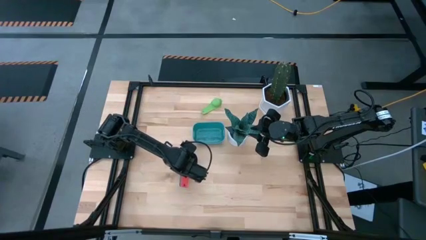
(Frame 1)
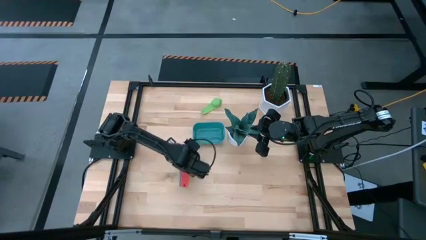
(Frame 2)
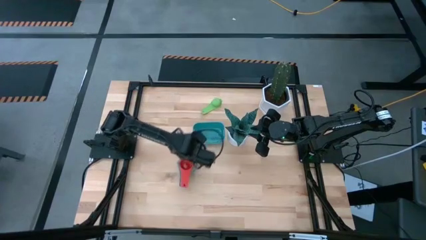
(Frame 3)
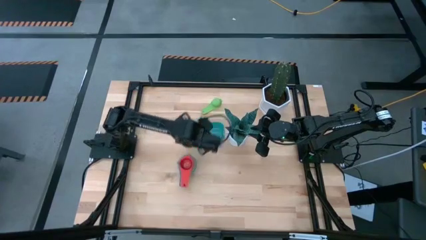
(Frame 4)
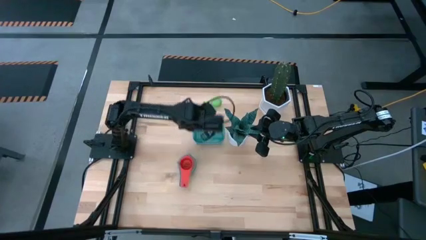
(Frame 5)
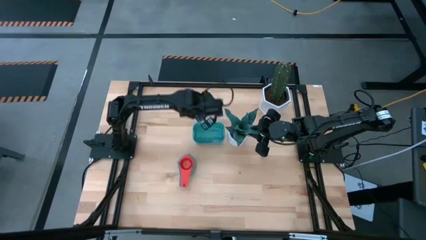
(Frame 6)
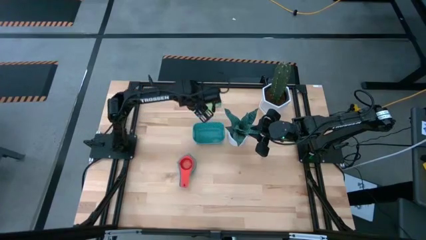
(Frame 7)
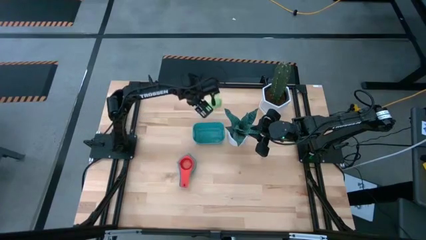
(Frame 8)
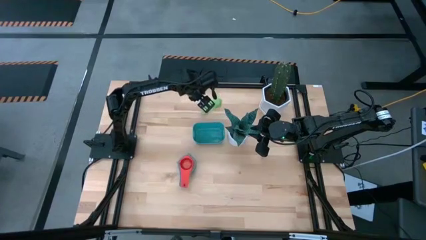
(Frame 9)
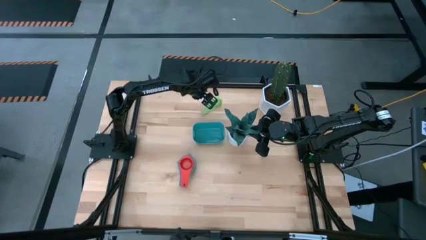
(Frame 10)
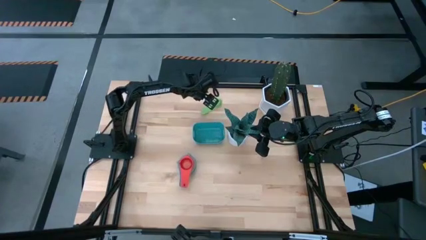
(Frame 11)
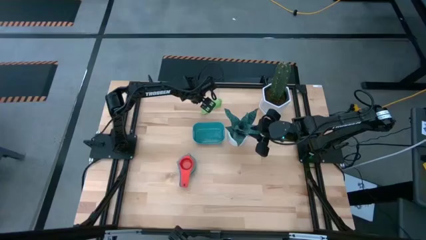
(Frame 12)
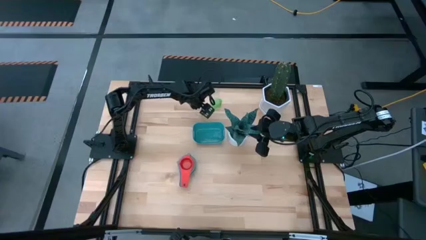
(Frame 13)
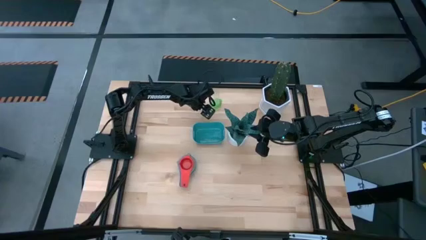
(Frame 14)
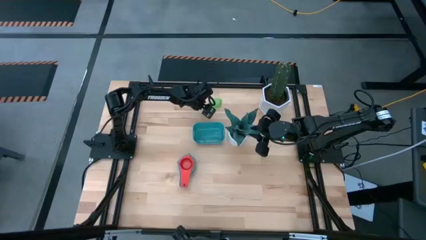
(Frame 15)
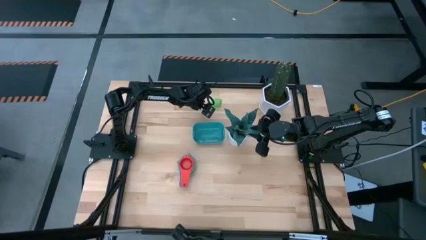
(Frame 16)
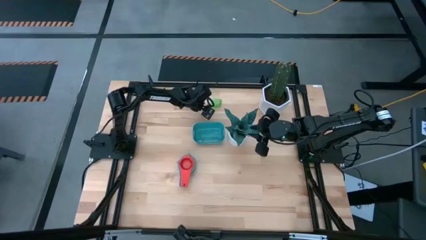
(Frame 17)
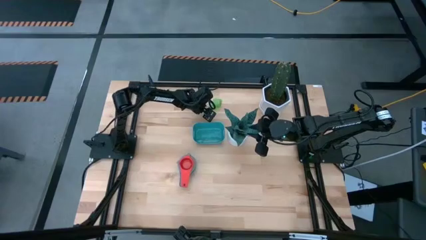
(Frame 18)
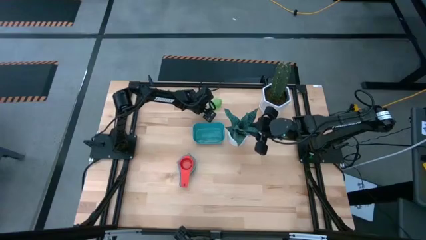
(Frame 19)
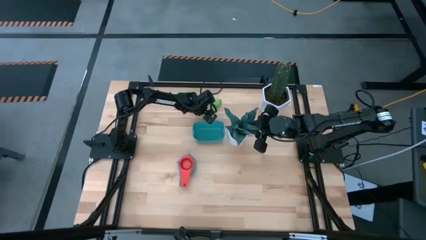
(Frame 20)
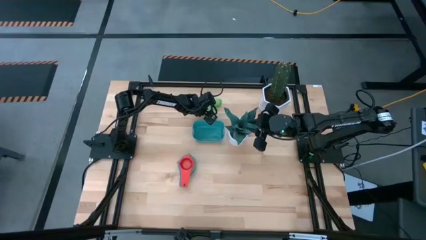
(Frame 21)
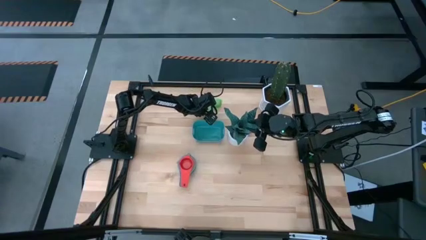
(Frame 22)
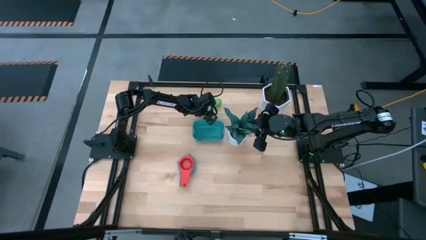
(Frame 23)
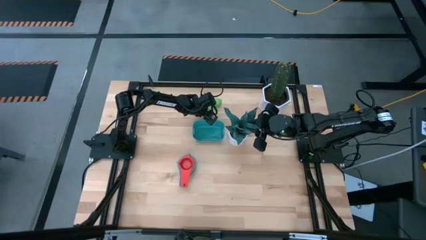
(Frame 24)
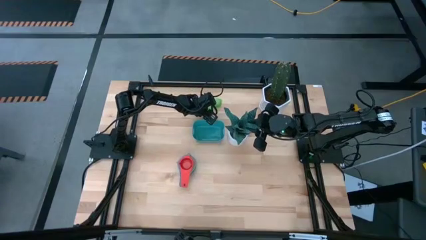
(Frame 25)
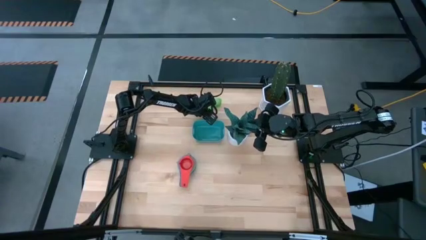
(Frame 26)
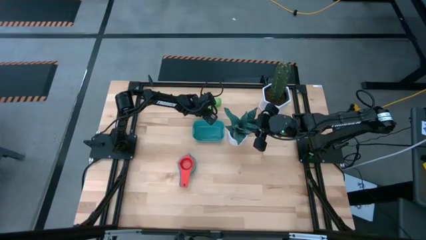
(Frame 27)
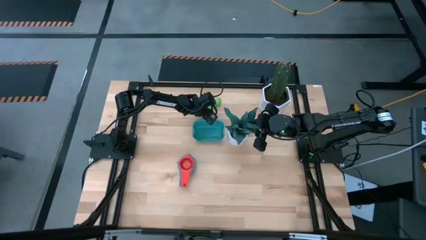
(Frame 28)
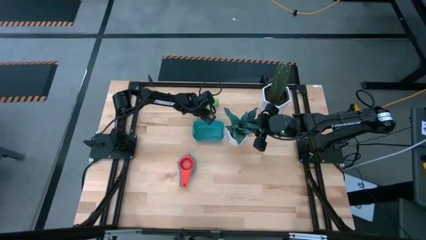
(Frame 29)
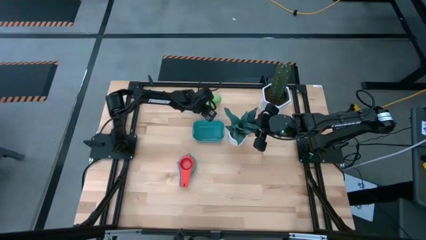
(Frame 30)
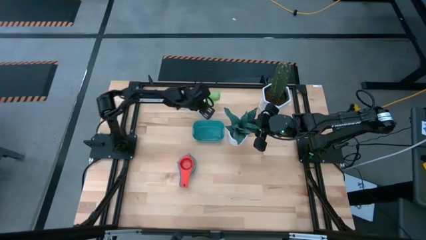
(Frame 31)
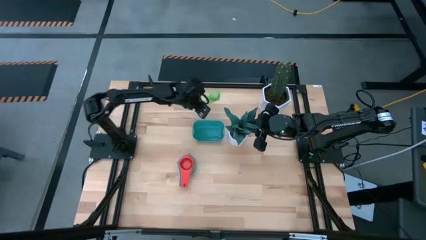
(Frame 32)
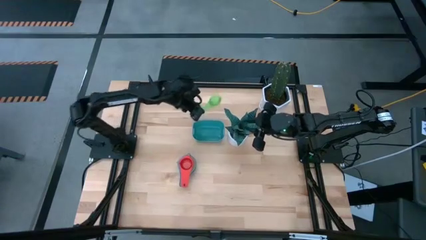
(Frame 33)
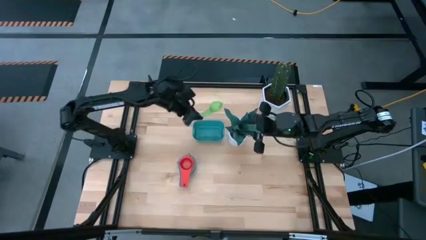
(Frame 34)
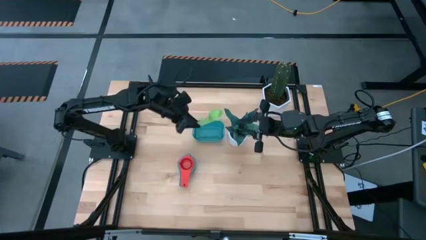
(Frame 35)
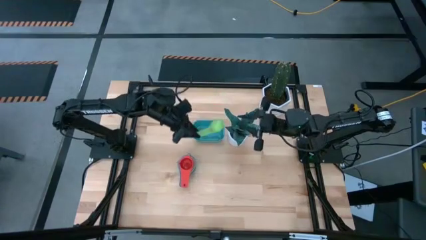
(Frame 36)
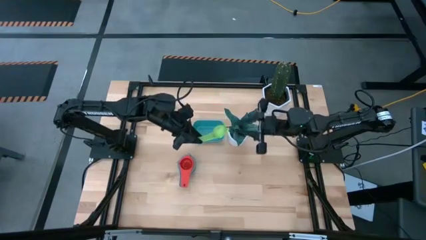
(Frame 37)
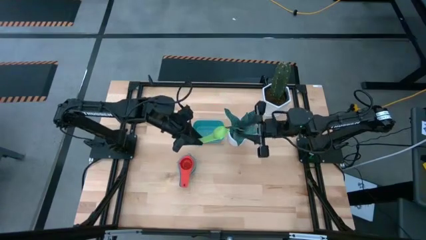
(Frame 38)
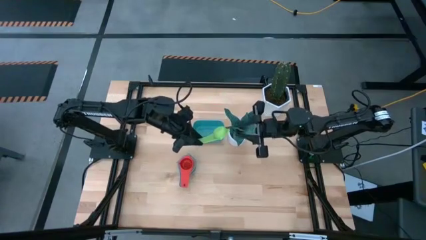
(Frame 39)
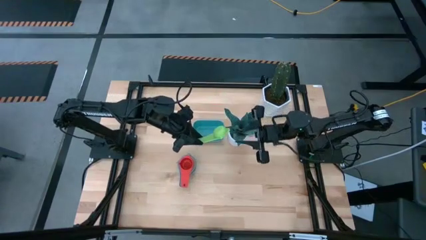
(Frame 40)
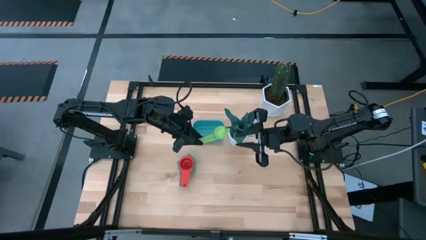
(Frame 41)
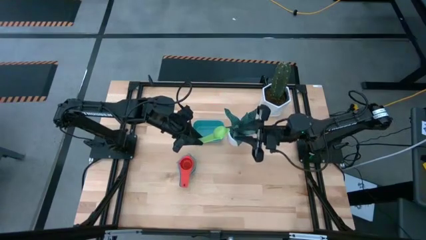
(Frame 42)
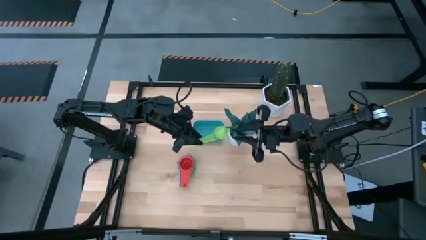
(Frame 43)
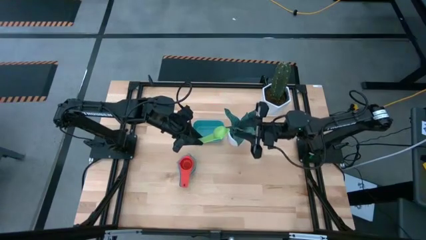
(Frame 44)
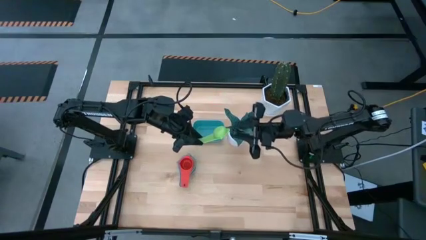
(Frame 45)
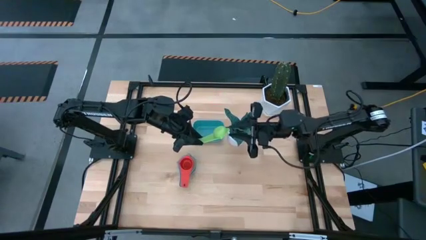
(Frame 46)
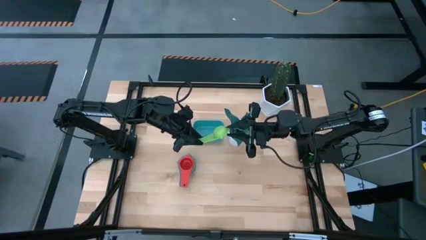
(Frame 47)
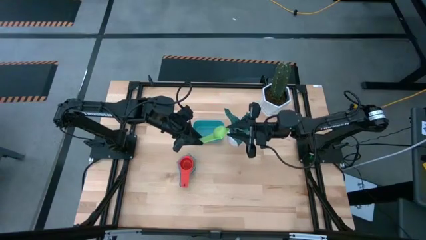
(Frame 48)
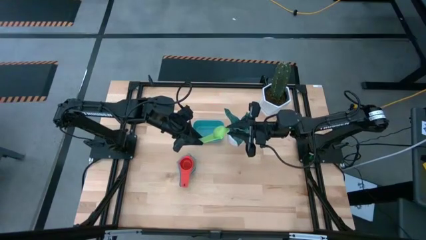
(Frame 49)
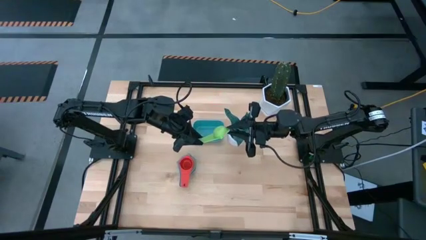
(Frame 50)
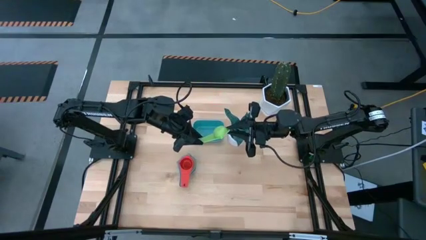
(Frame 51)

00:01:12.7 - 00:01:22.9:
Task: Nest measuring cups in basket
Stack the green measuring cup on top of the red measuring cup

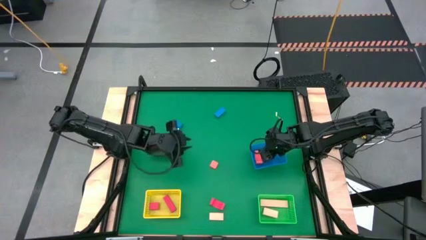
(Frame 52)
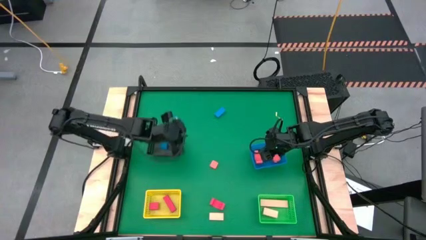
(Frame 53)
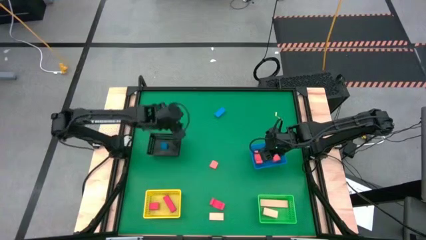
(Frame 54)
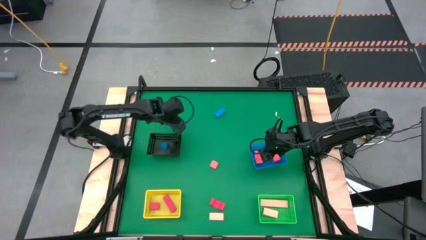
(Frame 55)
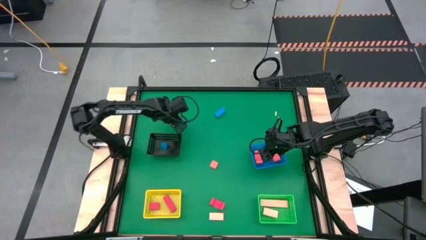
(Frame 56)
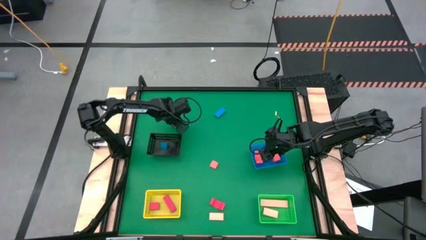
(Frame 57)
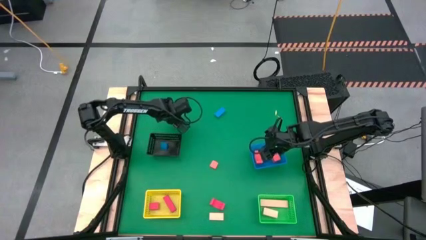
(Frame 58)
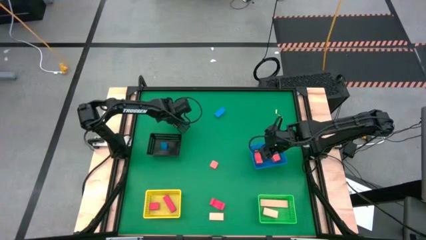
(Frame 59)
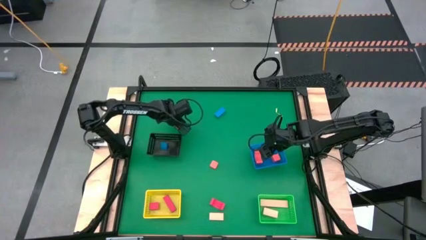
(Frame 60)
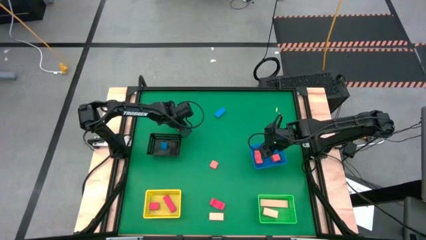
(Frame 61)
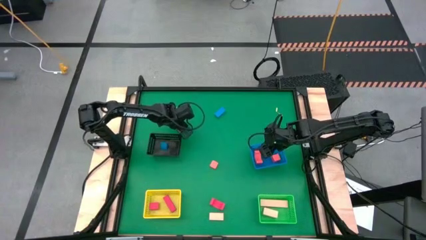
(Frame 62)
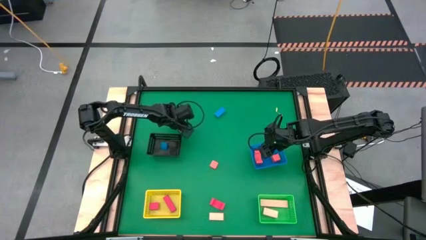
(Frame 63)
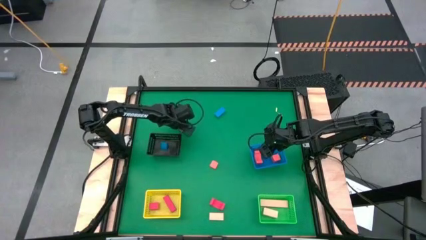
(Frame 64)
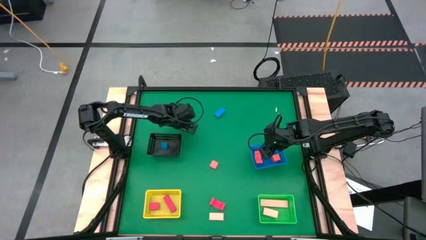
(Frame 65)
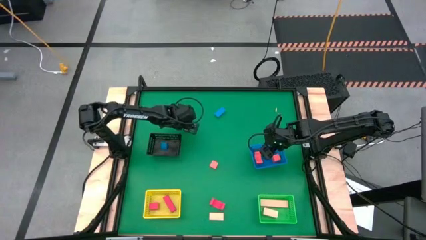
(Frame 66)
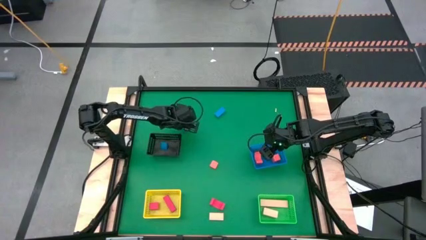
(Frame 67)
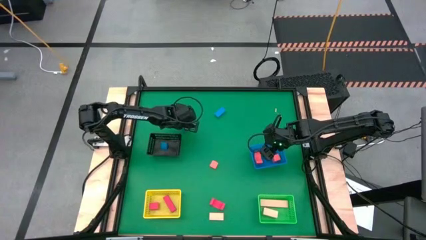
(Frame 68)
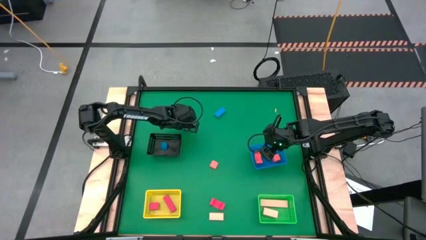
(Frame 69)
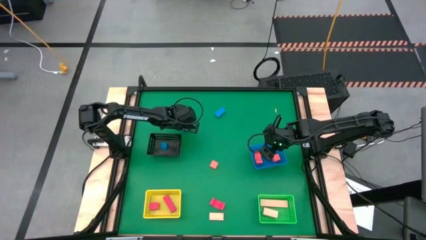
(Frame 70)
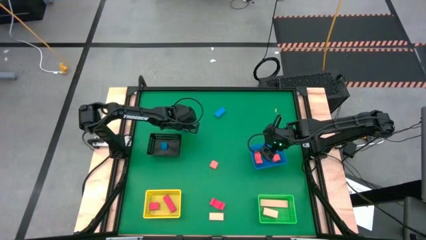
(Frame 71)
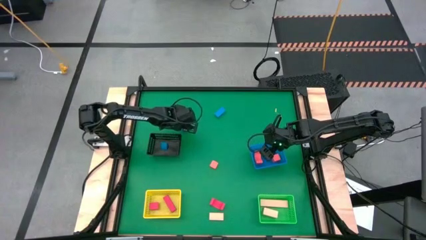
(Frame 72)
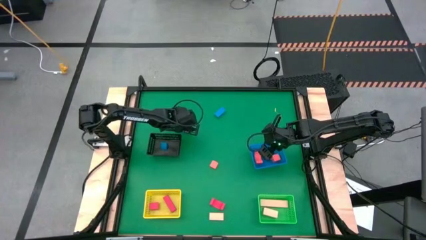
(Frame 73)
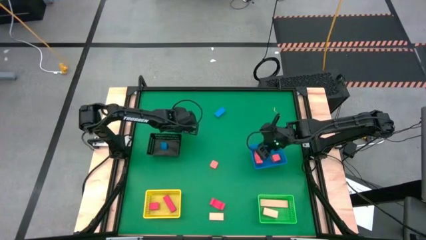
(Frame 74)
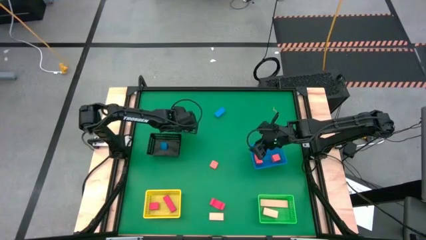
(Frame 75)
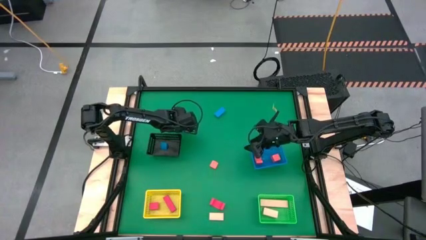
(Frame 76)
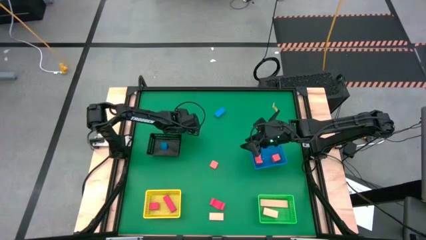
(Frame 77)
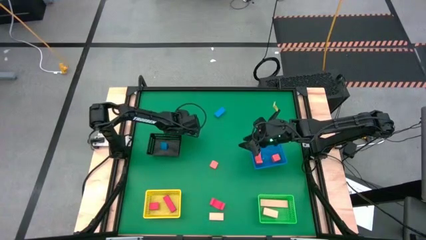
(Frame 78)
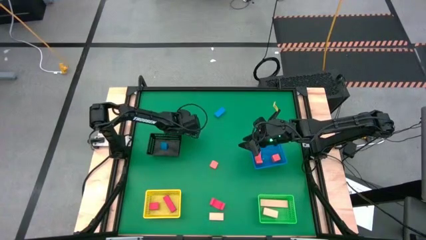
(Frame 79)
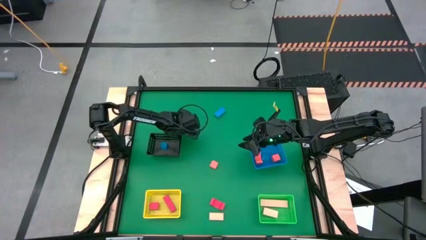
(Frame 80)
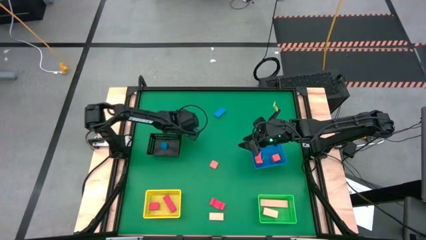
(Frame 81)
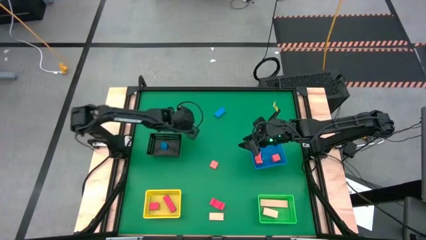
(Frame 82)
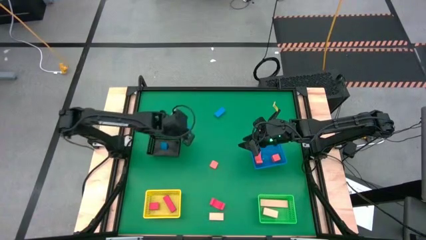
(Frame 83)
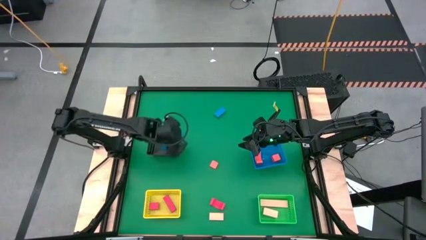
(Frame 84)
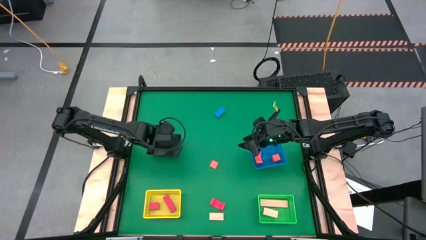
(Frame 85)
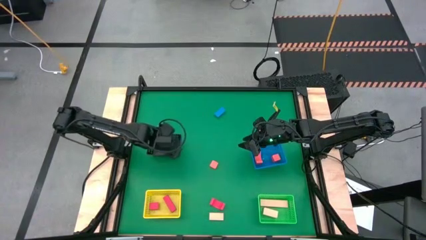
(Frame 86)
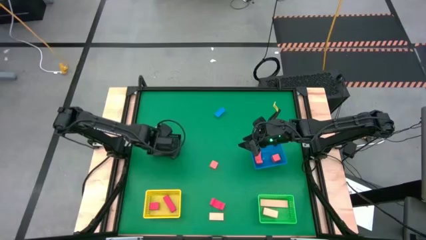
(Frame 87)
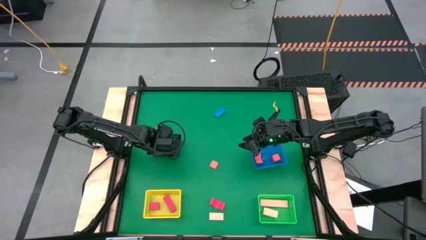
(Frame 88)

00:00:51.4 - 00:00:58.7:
Task: Sort & place blocks by color
Put the left blue block into the black bin
